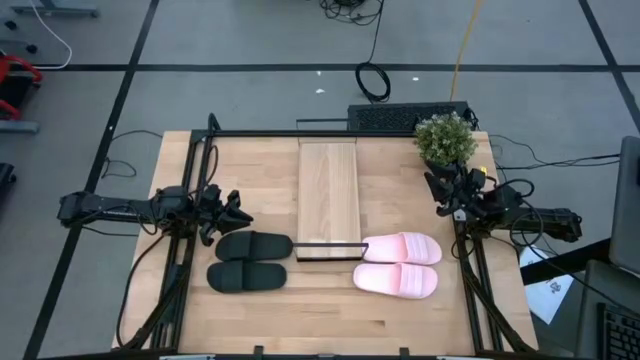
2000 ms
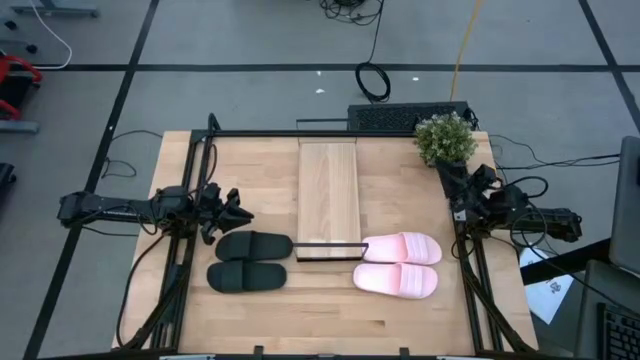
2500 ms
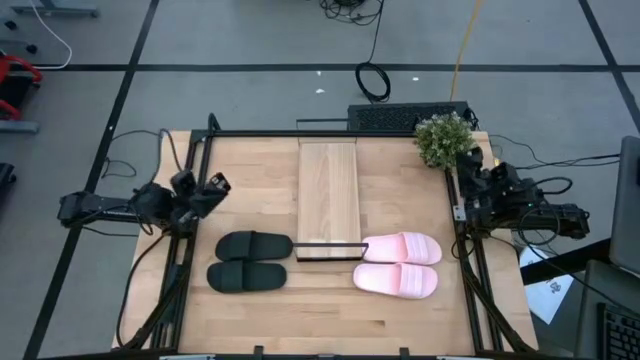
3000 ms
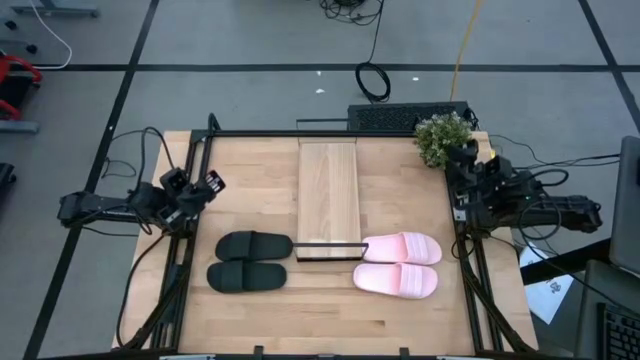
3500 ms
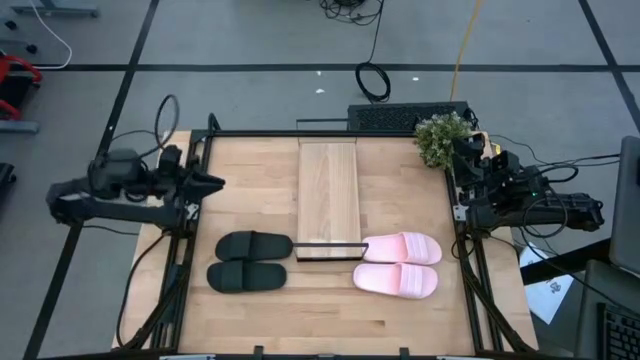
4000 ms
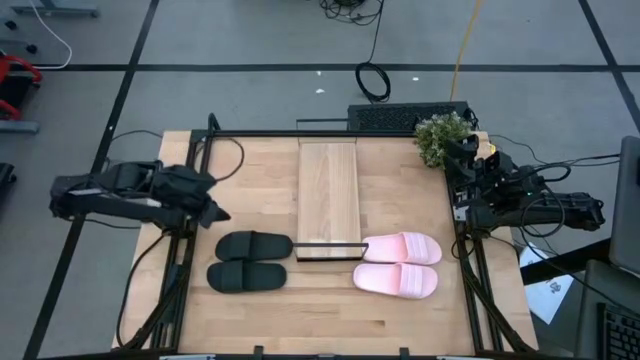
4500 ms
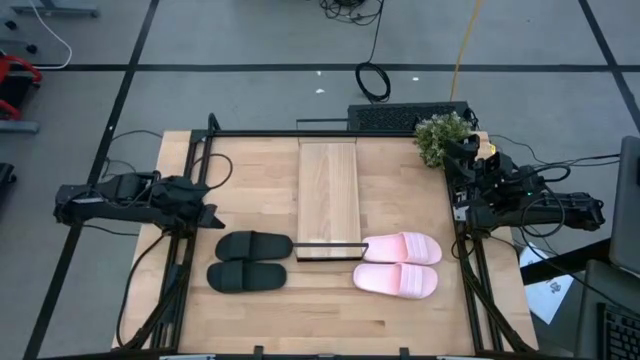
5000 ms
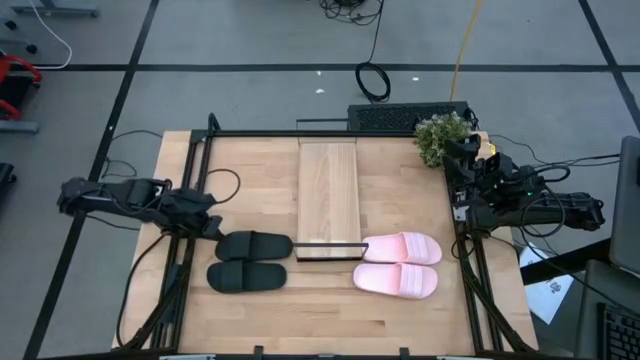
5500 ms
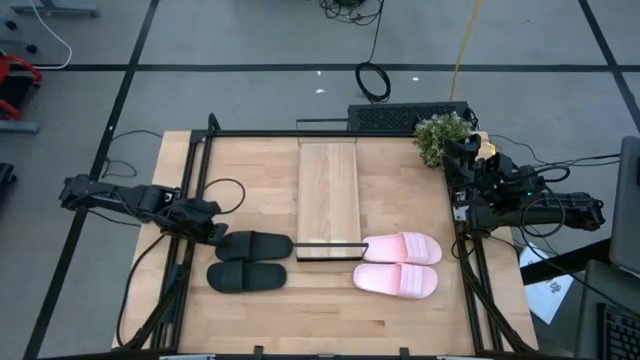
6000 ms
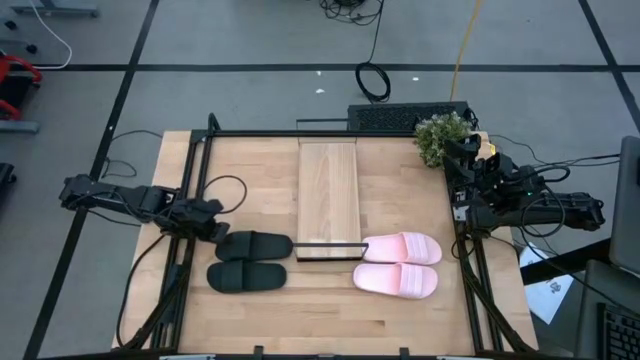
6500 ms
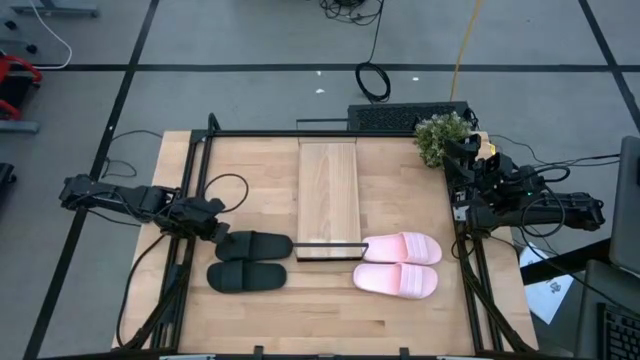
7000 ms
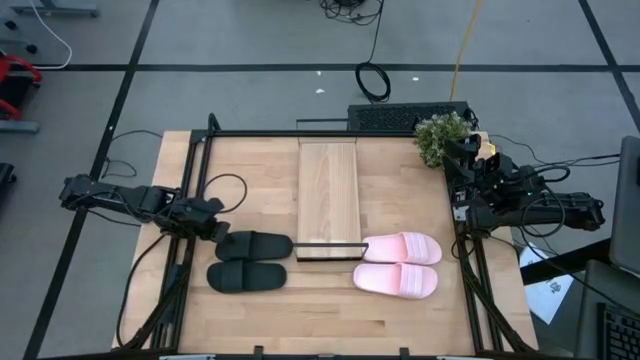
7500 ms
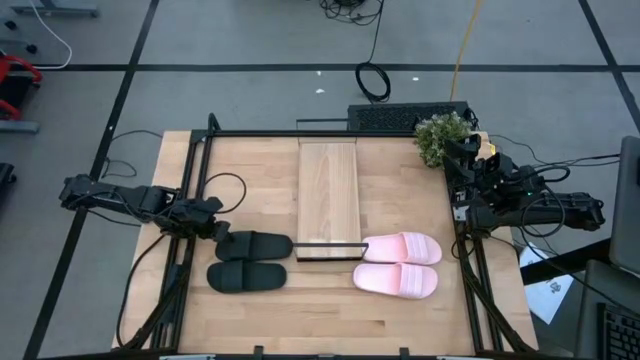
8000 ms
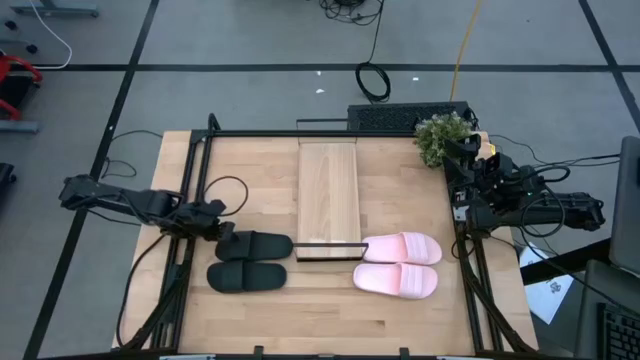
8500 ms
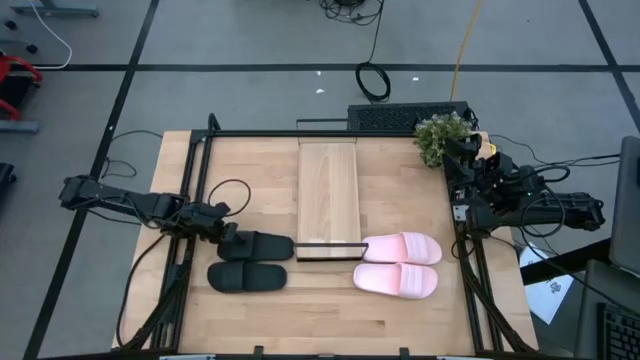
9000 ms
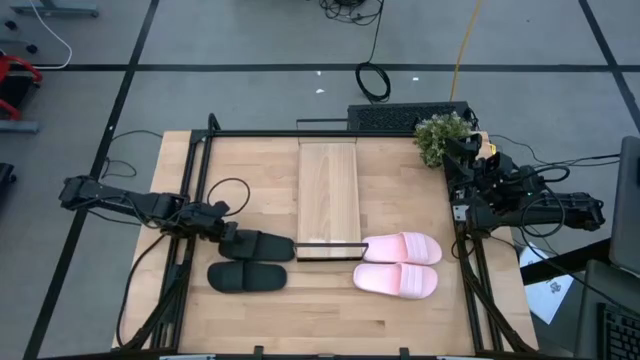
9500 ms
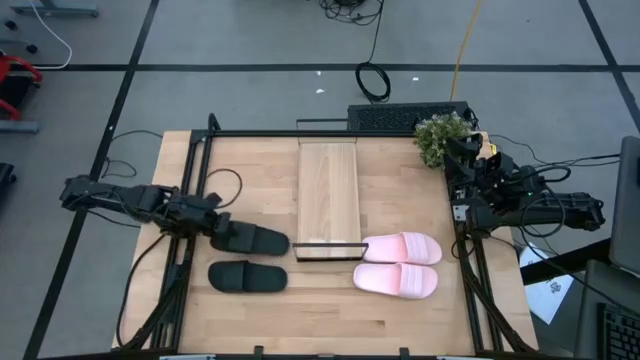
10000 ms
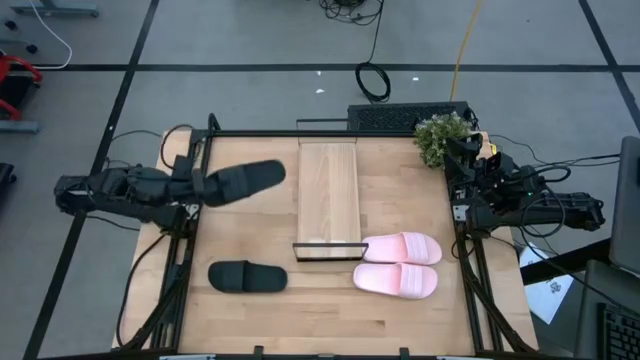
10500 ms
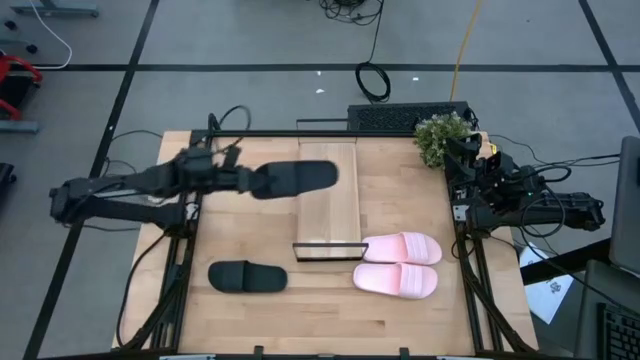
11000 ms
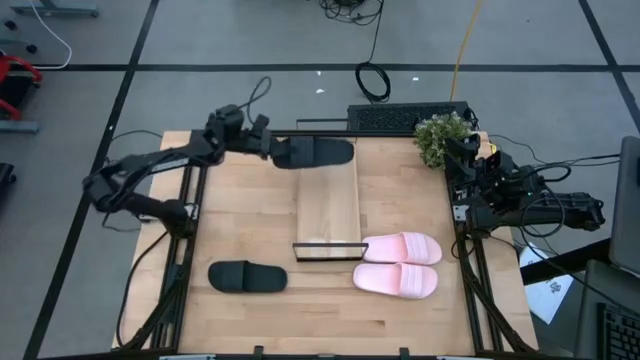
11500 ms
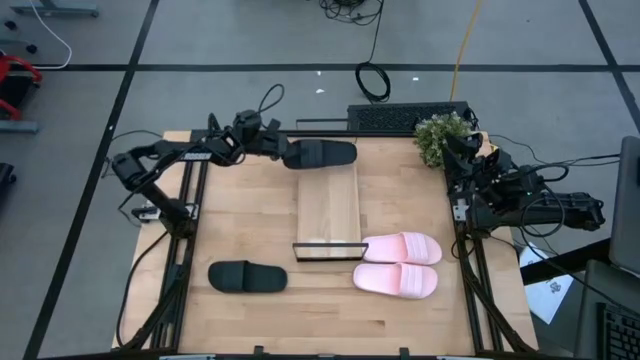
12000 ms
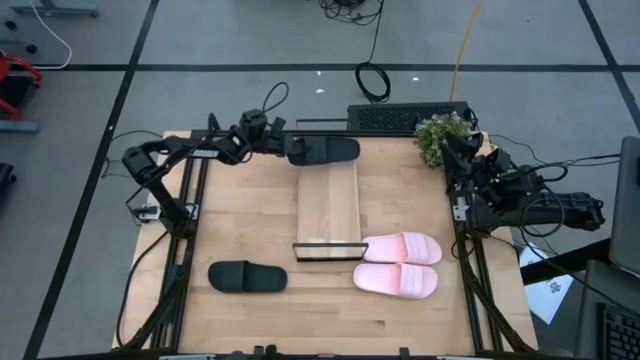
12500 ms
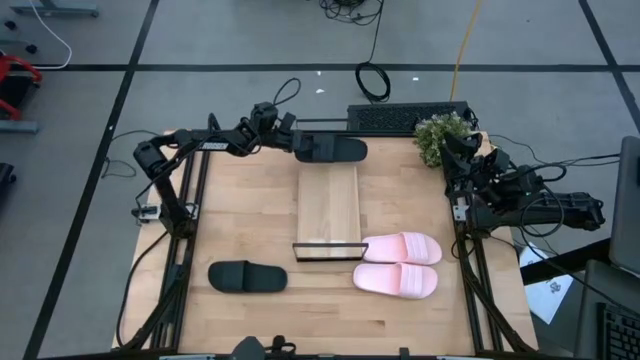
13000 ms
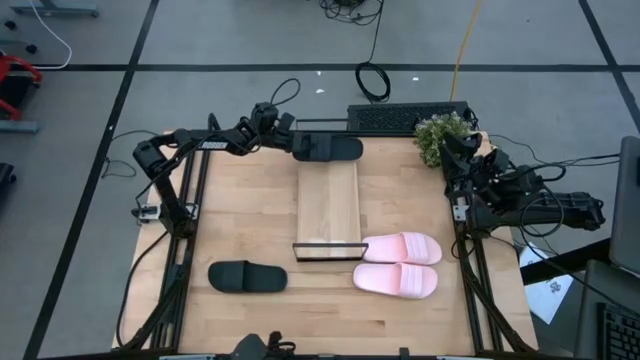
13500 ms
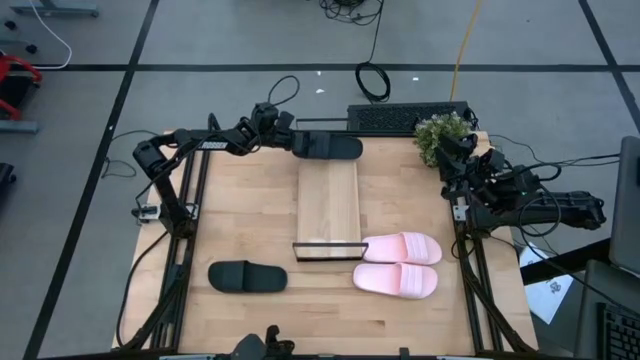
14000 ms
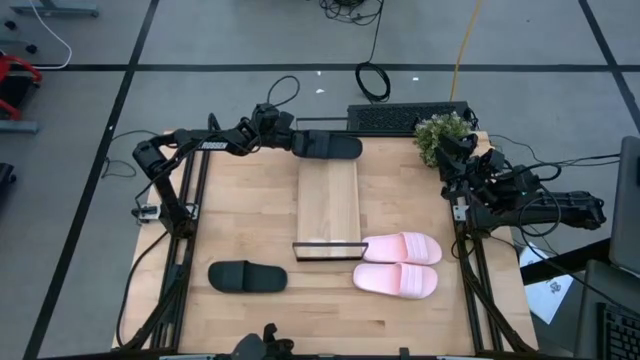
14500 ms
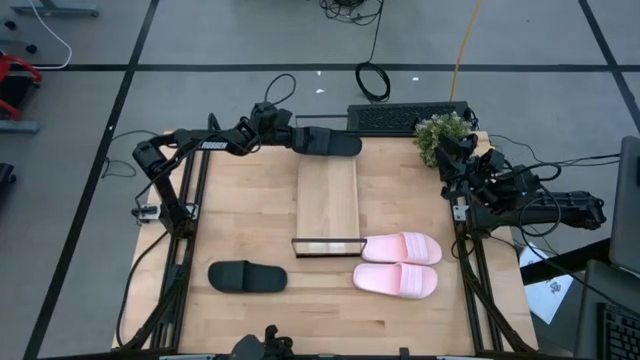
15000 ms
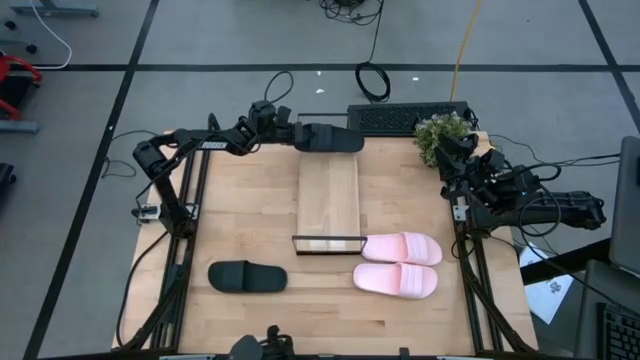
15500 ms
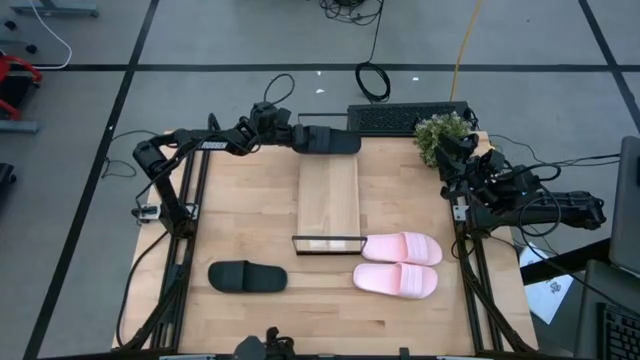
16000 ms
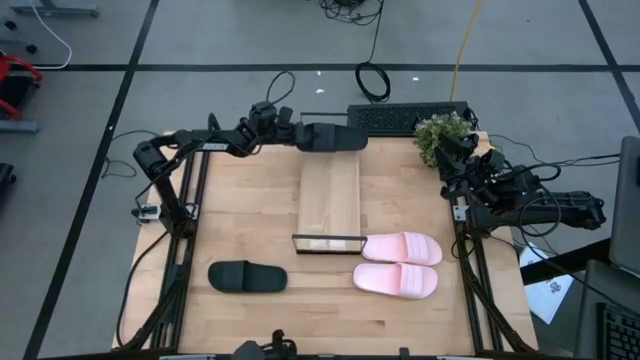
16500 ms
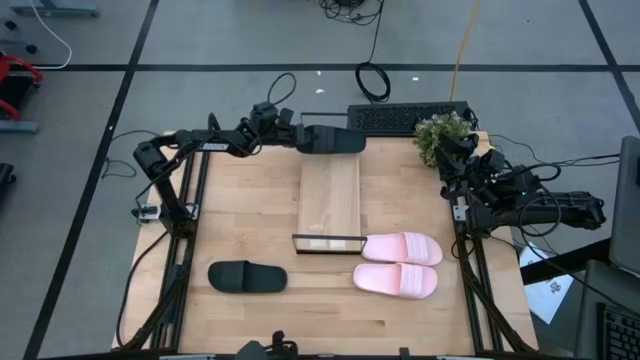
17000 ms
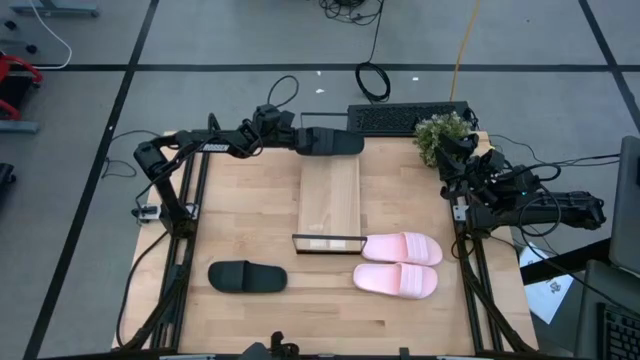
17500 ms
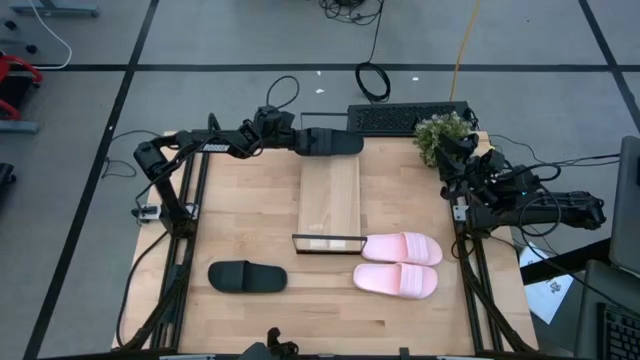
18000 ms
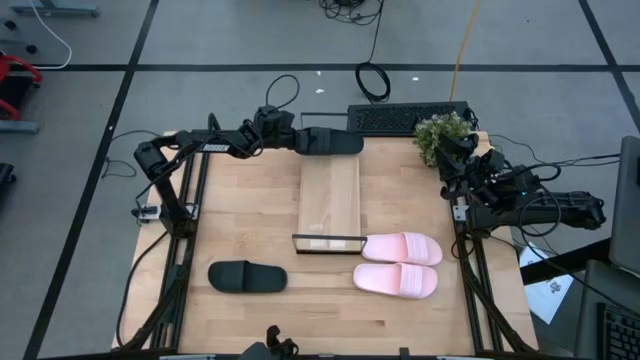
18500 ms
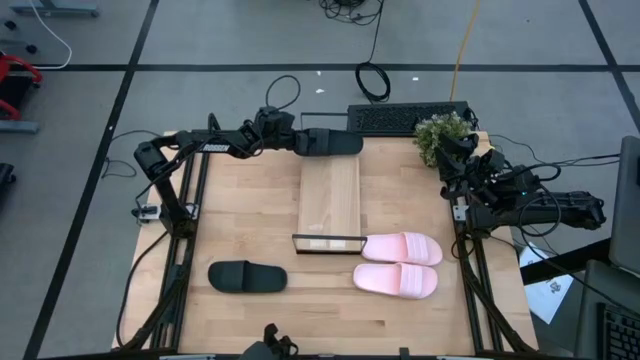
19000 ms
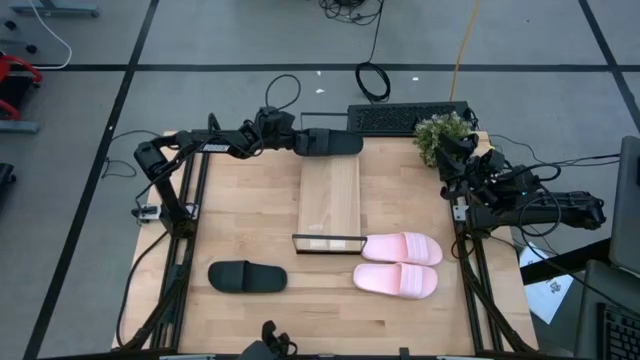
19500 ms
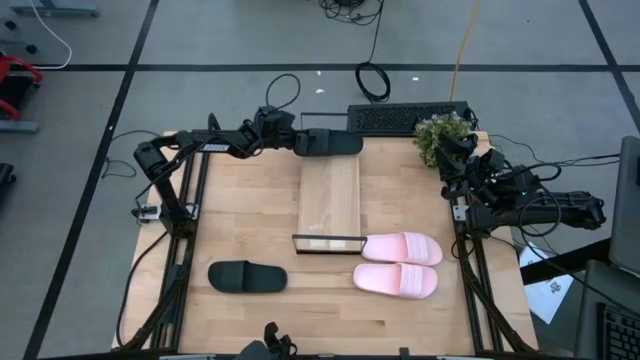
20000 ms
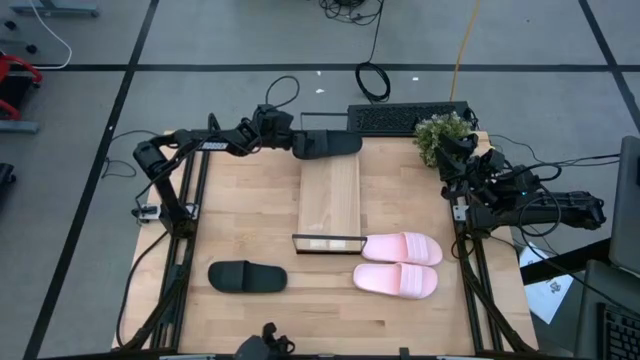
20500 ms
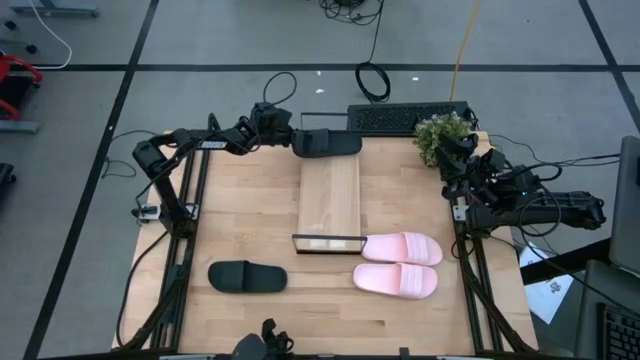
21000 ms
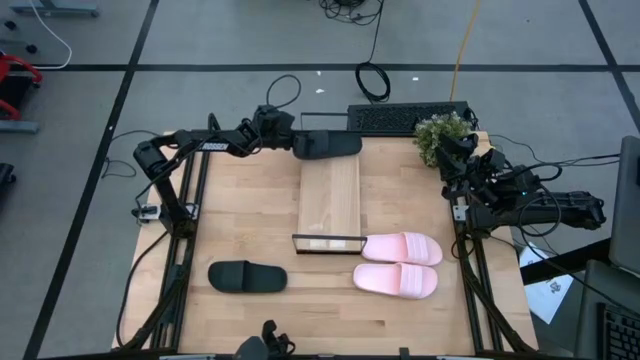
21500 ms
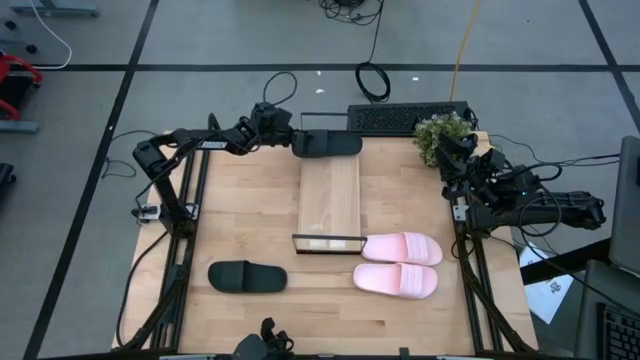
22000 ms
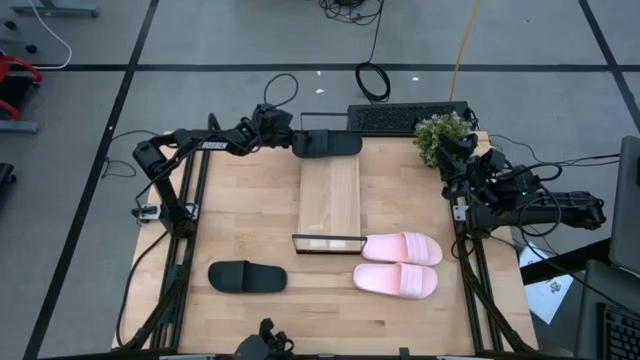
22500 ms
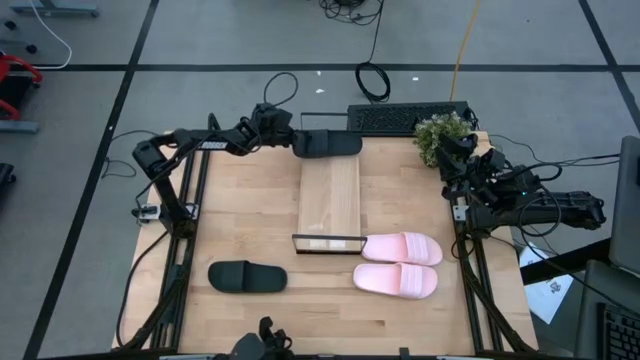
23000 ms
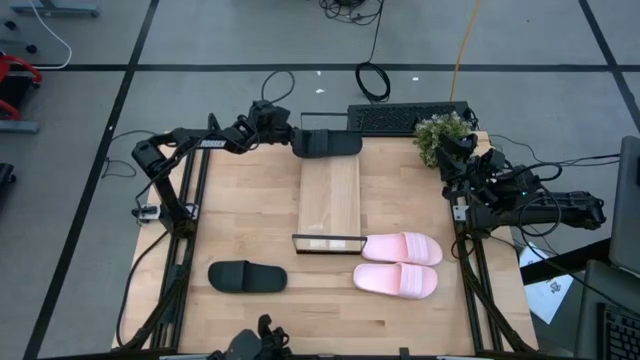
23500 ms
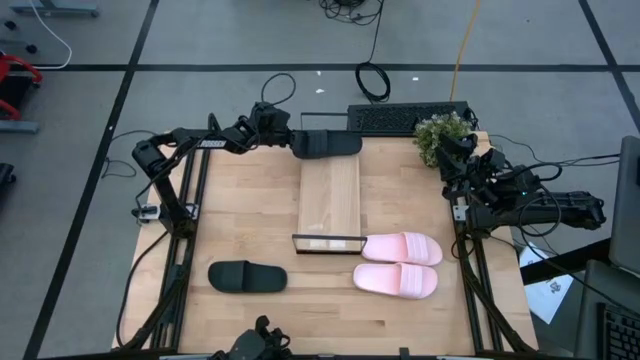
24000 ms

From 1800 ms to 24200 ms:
Task: Pick and place slides into the shelf
Put the top black slides on the shelf
